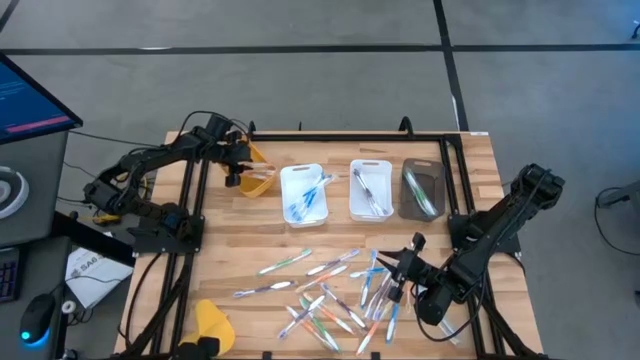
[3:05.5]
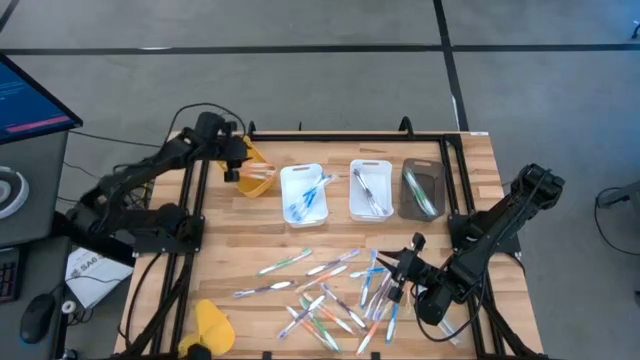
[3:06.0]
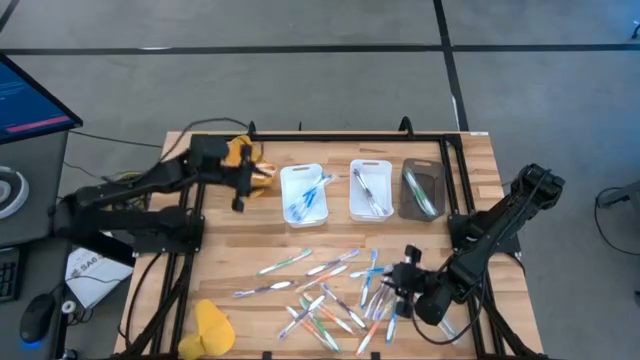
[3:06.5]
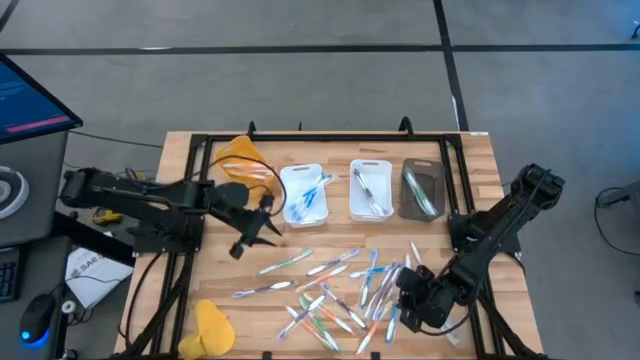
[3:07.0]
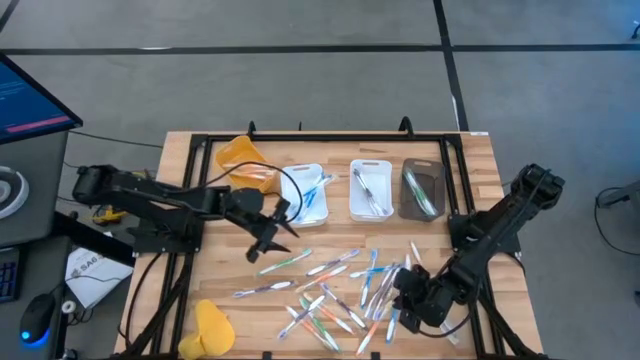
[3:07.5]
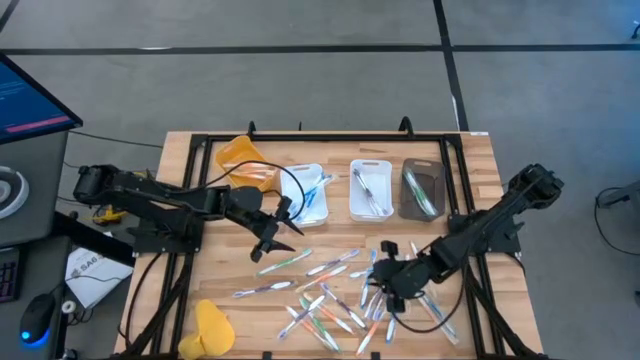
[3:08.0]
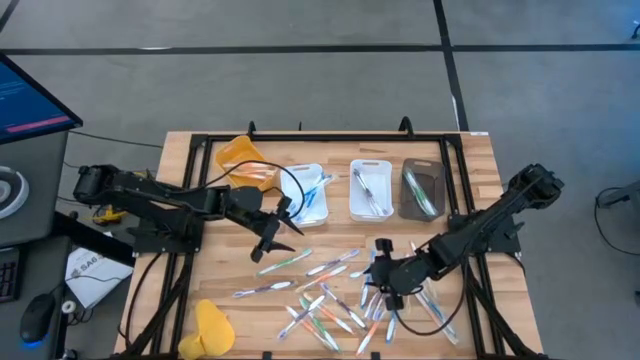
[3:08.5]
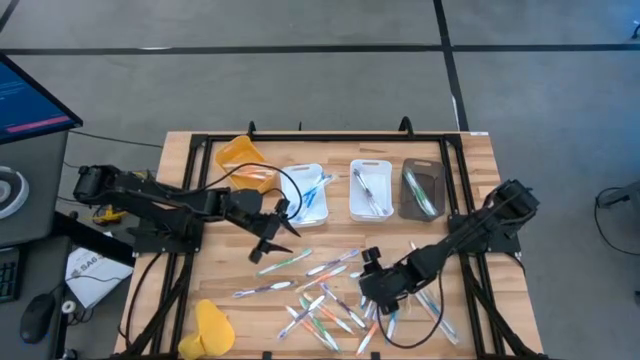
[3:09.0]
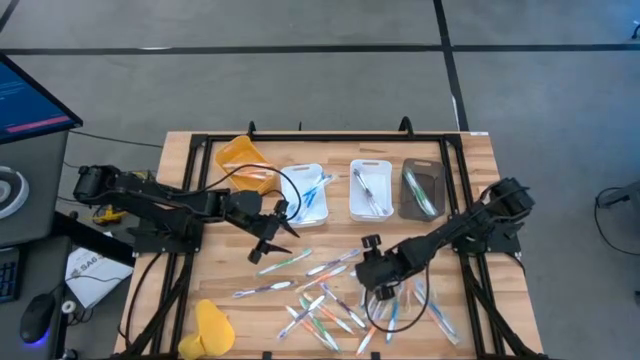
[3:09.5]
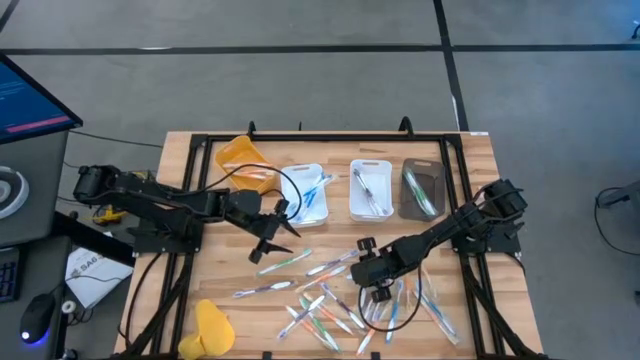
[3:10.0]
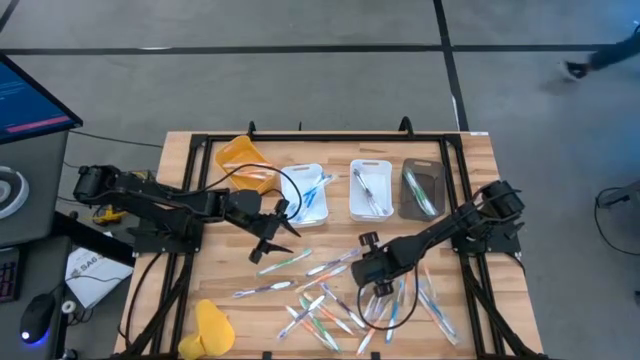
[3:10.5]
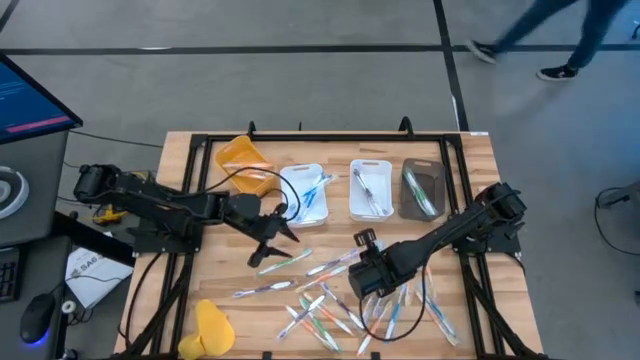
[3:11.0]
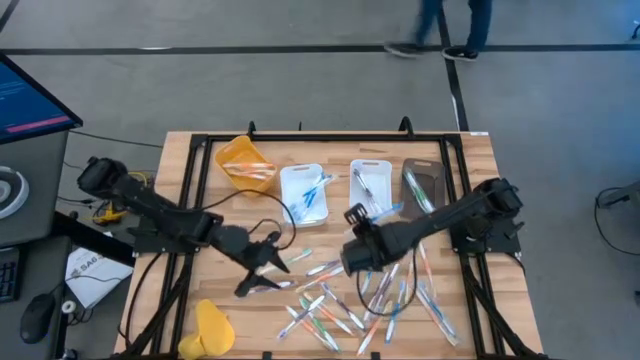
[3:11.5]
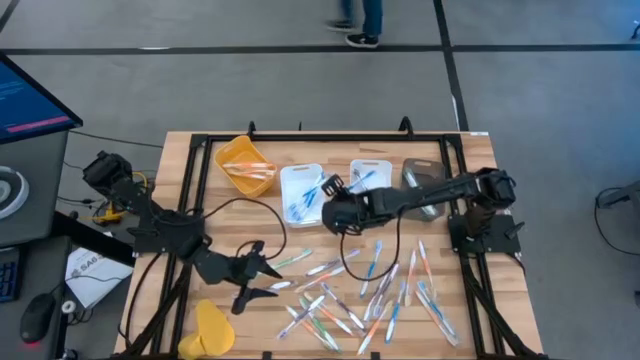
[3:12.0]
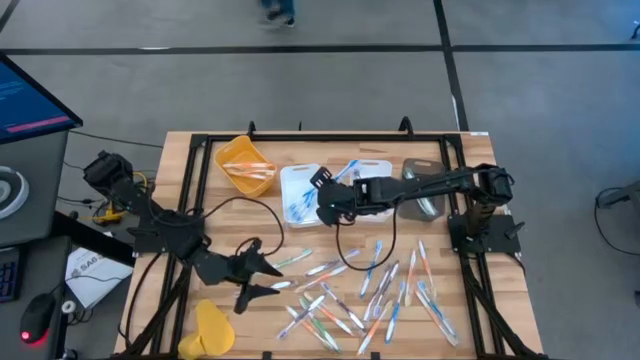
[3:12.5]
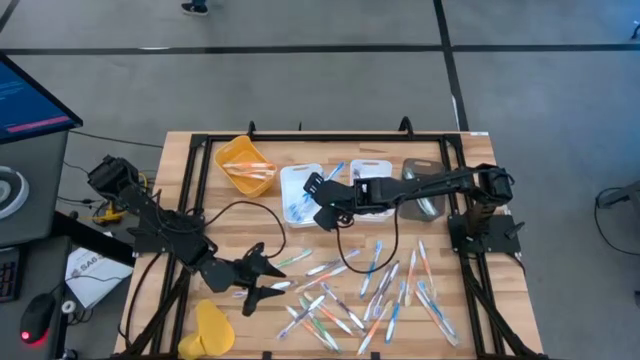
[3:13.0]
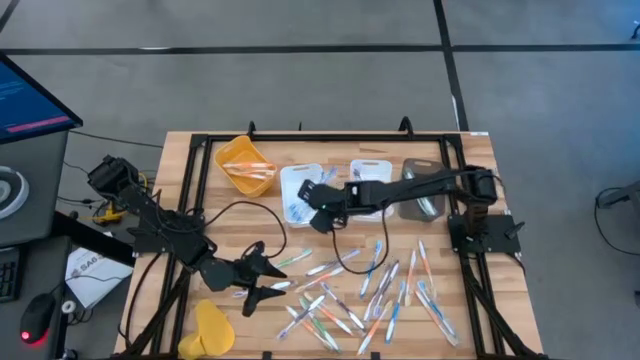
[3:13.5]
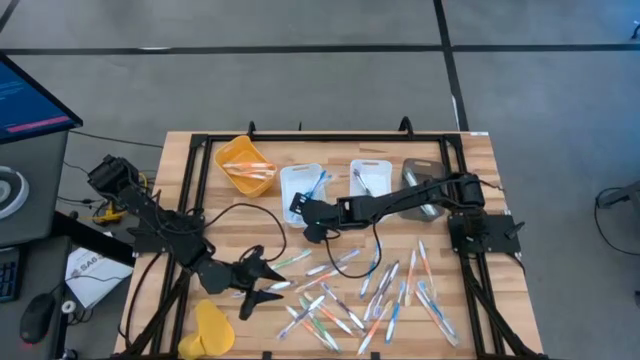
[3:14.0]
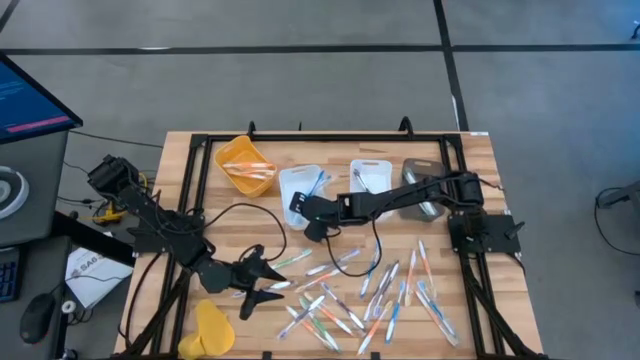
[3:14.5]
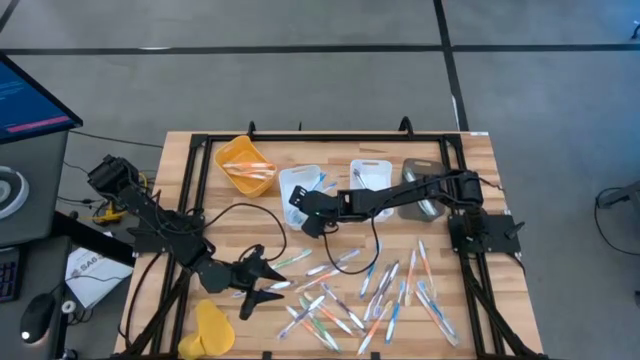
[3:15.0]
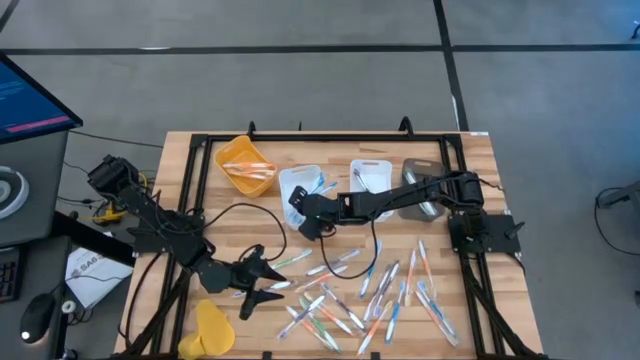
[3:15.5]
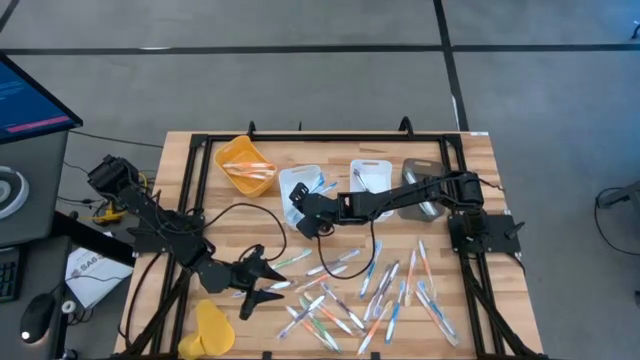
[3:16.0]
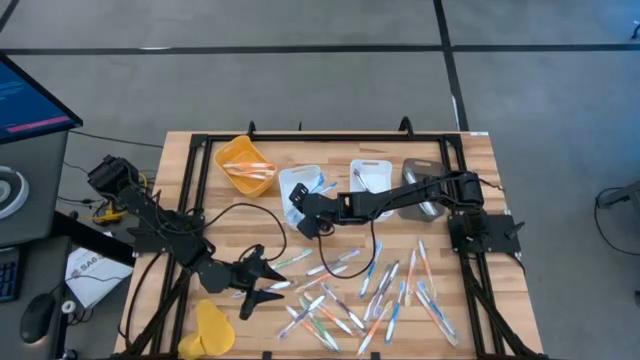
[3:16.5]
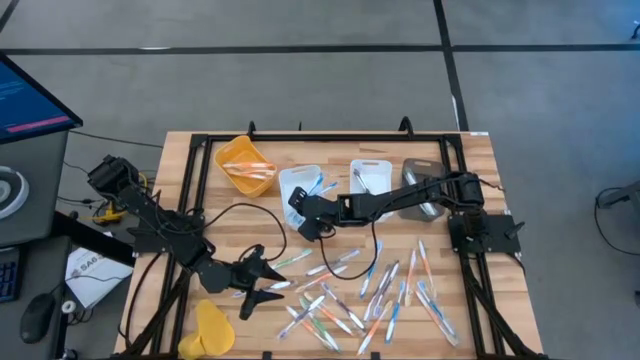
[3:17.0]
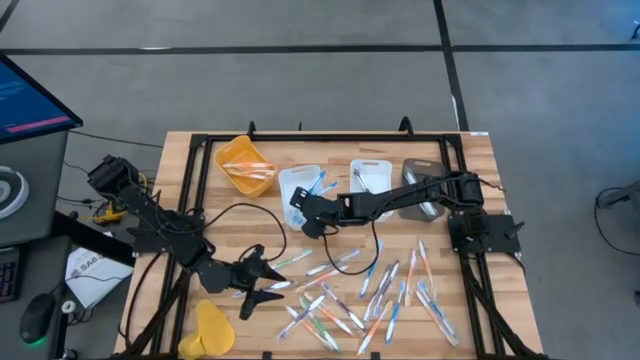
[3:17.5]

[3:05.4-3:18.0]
Task: Pick & Place Toothbrushes
Put the blue toothbrush into the left white bin

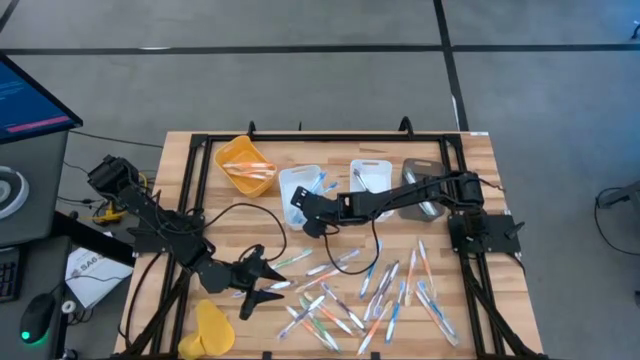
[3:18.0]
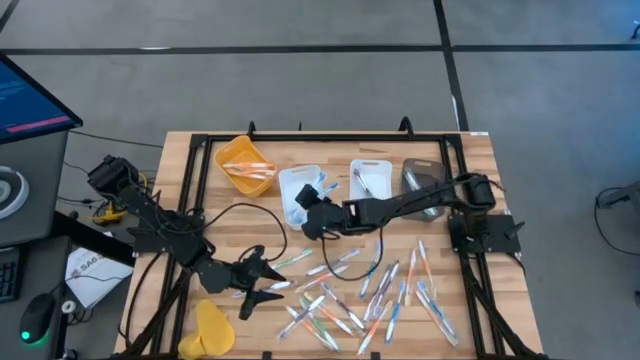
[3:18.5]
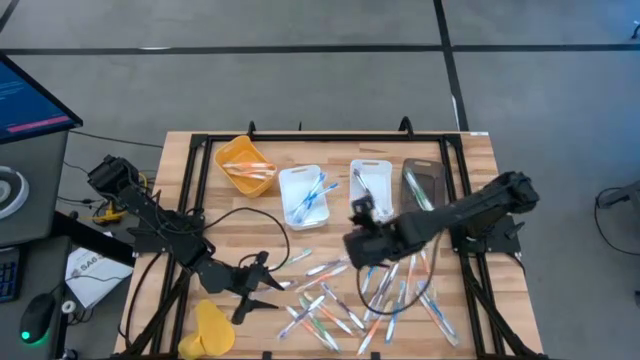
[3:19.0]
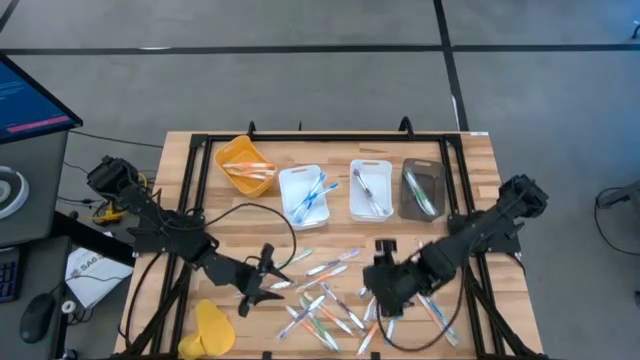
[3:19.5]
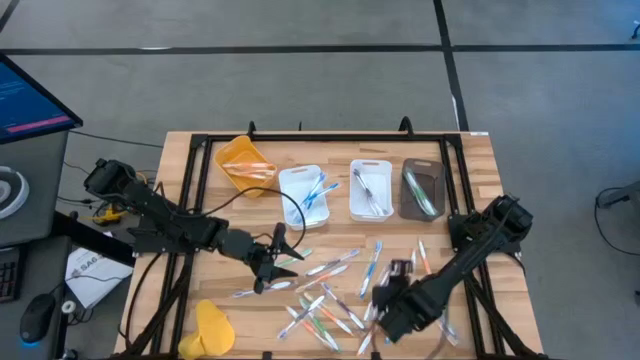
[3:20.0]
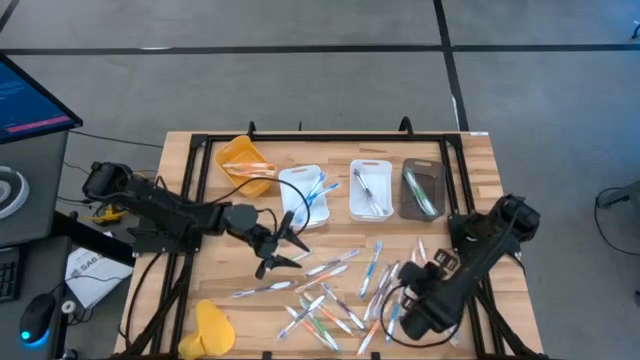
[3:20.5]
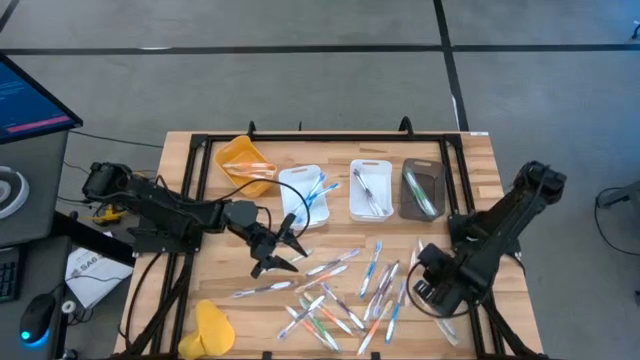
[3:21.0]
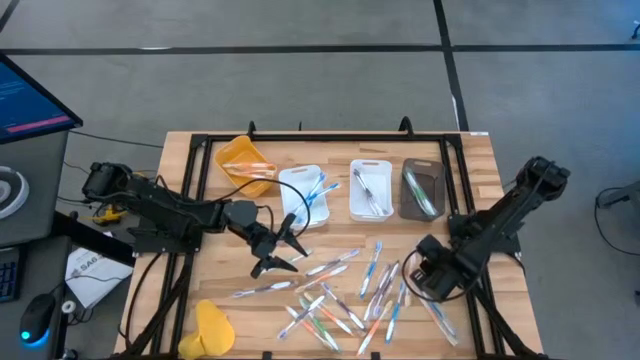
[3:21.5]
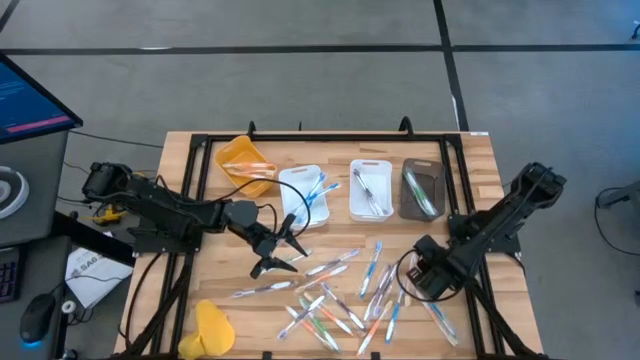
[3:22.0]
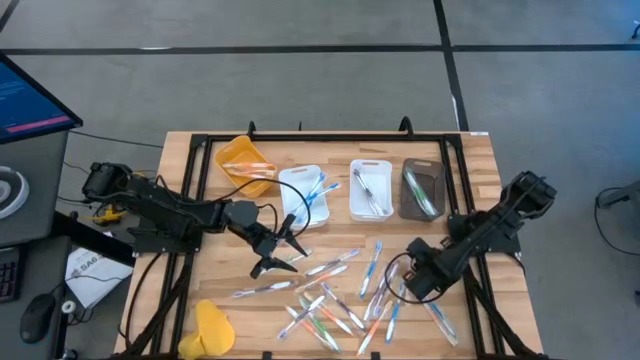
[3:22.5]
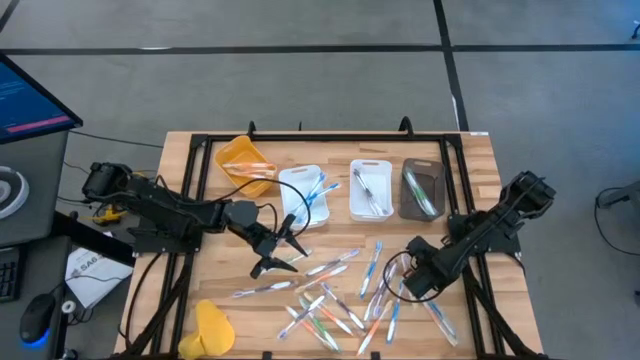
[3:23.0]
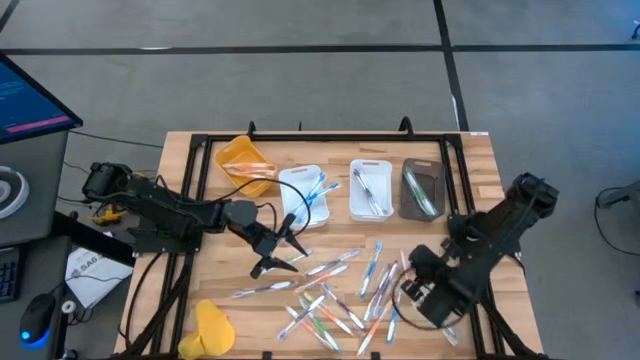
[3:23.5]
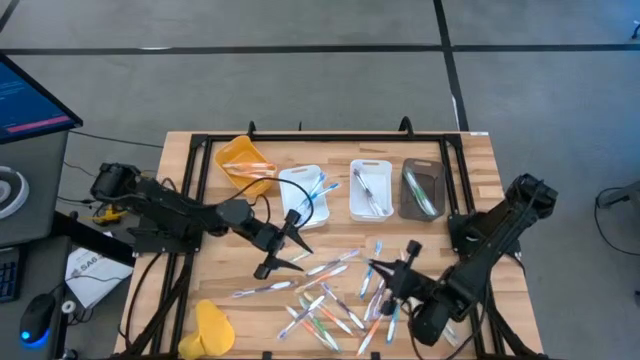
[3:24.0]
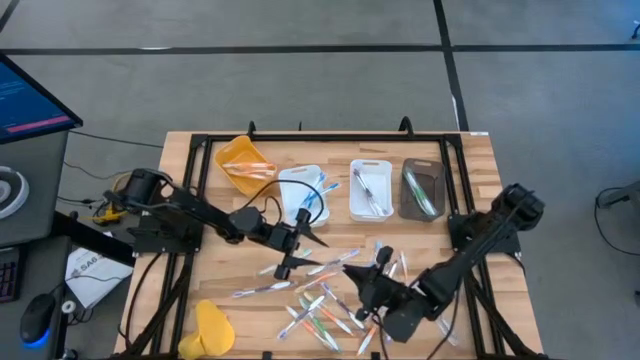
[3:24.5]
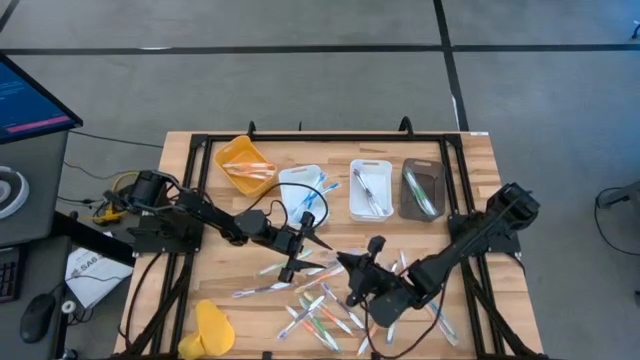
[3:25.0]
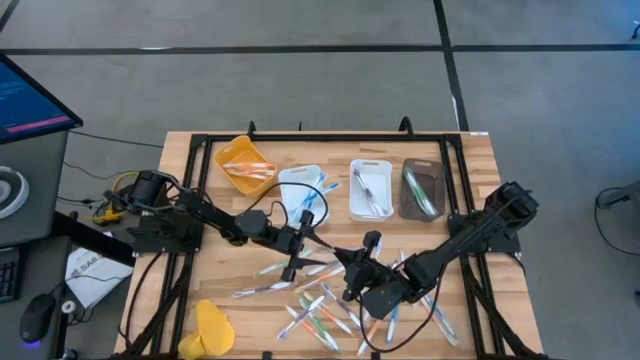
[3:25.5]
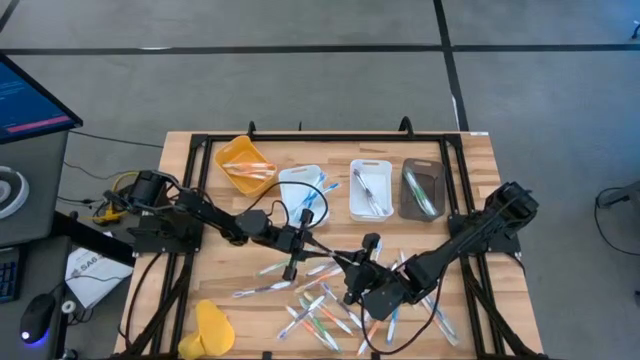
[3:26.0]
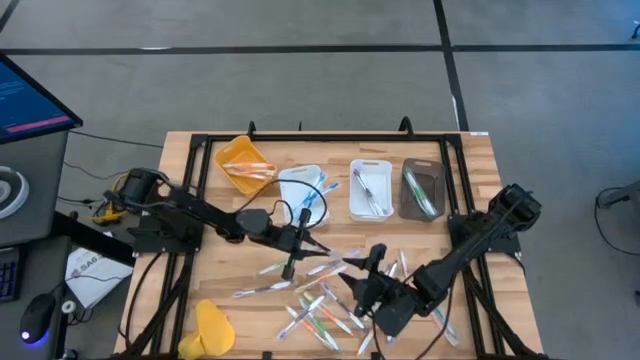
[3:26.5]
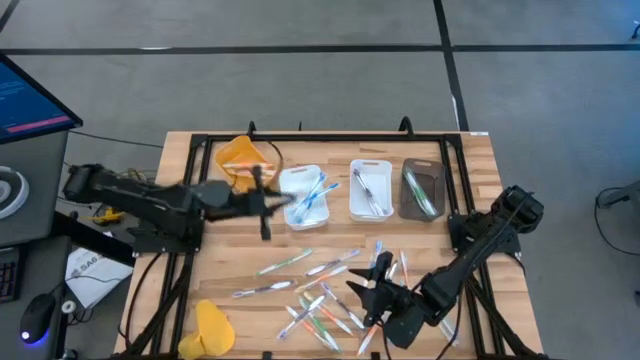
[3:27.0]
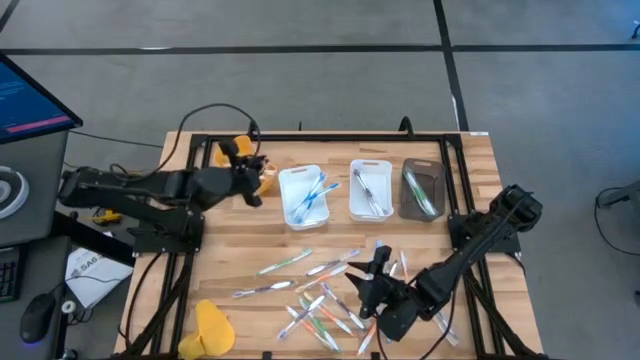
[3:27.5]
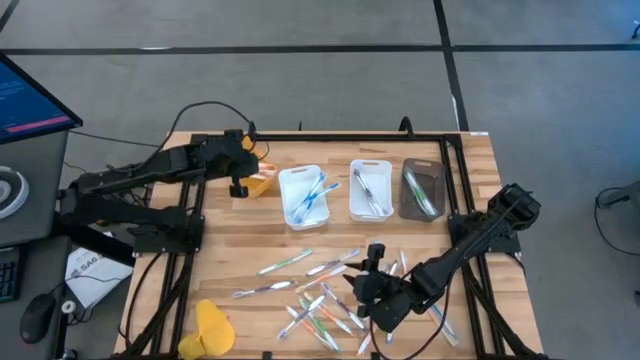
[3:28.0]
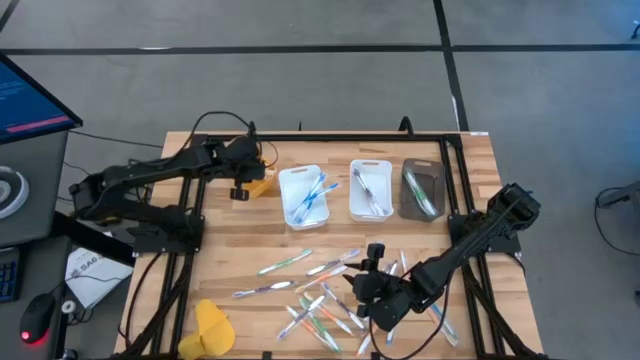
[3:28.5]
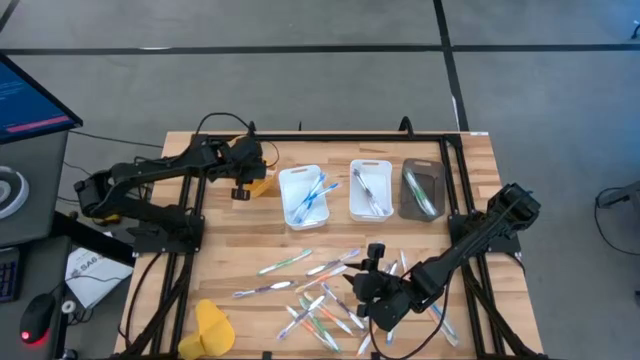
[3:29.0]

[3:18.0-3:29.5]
Put the orange toothbrush into the orange bin
